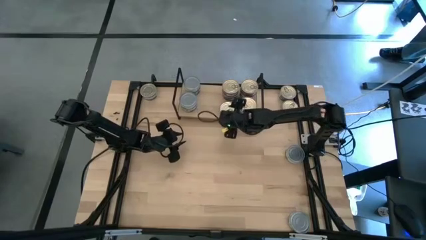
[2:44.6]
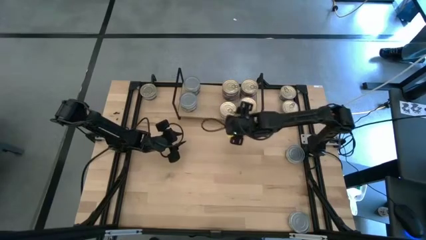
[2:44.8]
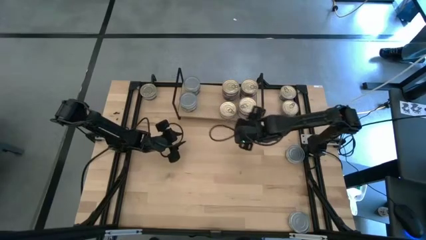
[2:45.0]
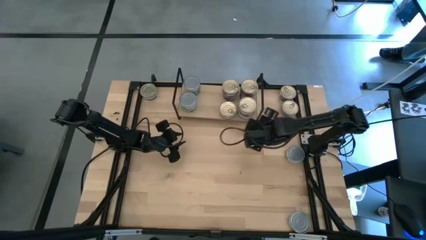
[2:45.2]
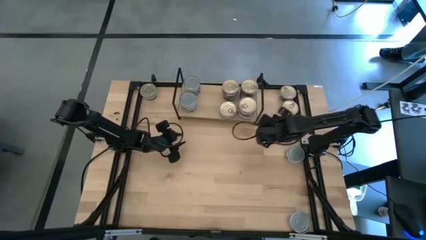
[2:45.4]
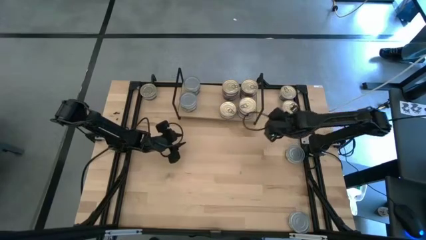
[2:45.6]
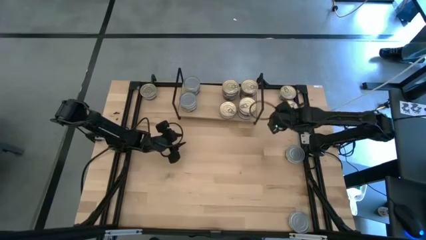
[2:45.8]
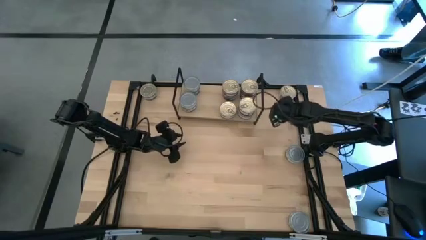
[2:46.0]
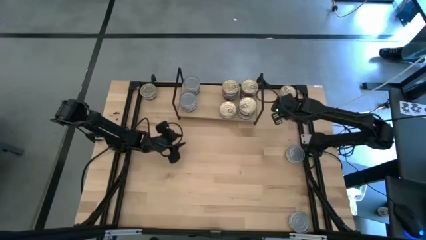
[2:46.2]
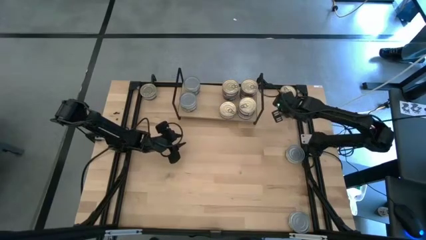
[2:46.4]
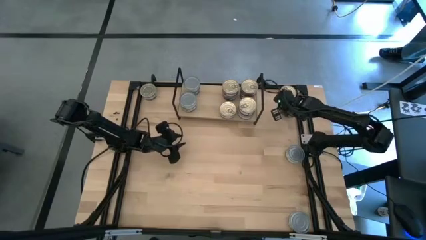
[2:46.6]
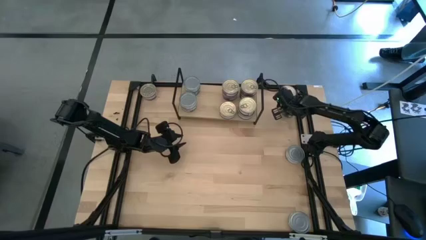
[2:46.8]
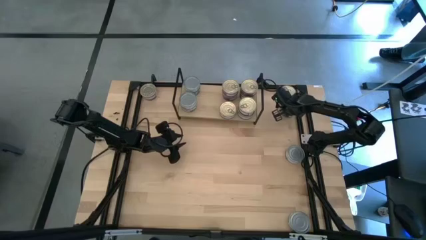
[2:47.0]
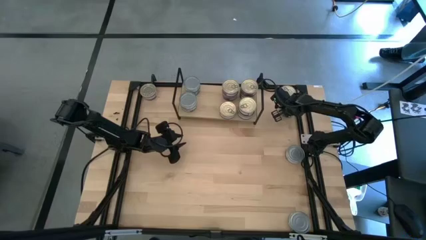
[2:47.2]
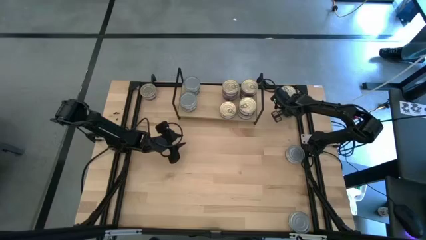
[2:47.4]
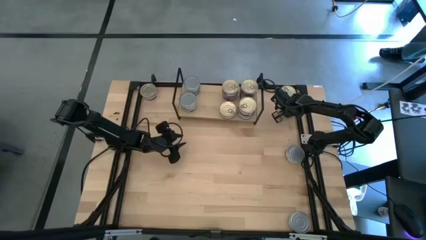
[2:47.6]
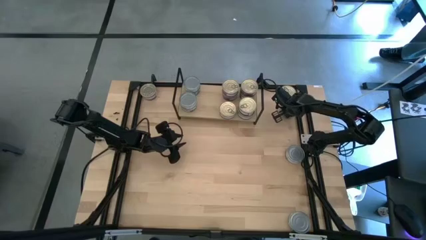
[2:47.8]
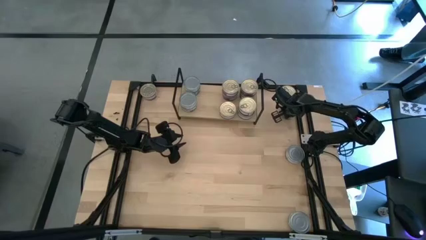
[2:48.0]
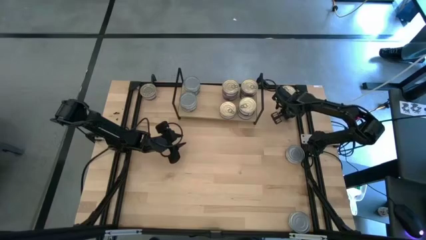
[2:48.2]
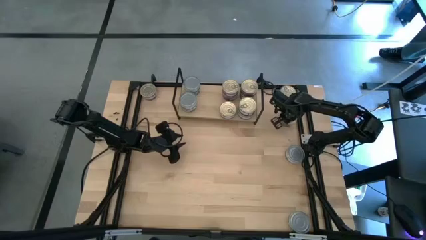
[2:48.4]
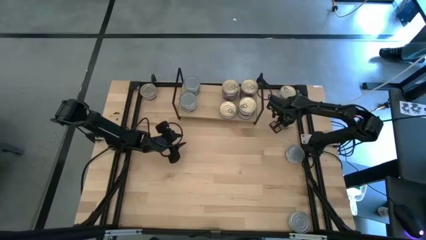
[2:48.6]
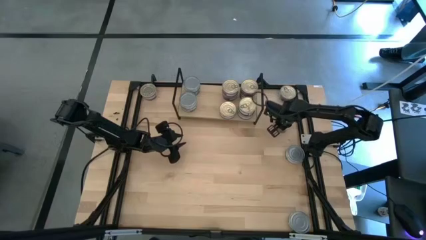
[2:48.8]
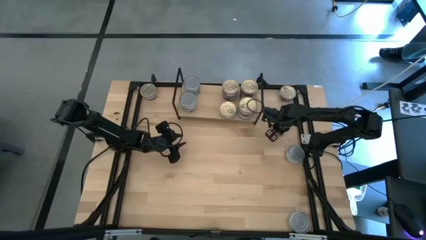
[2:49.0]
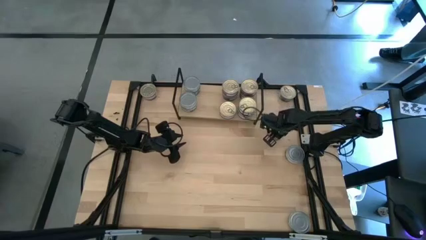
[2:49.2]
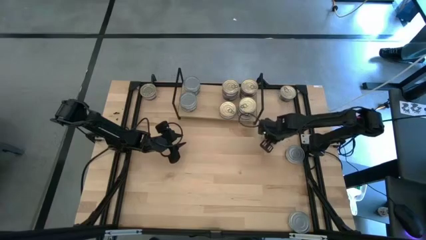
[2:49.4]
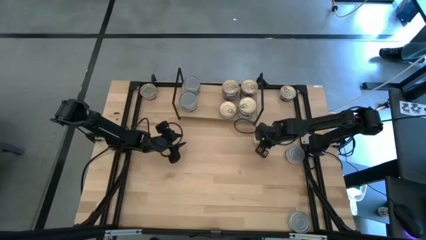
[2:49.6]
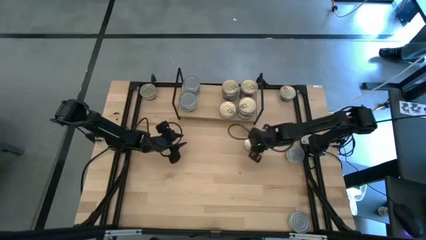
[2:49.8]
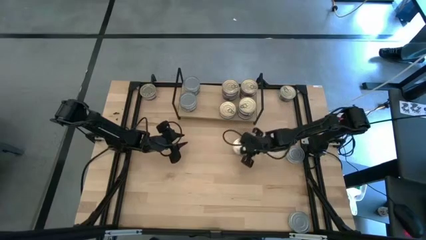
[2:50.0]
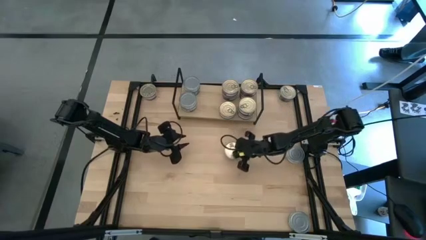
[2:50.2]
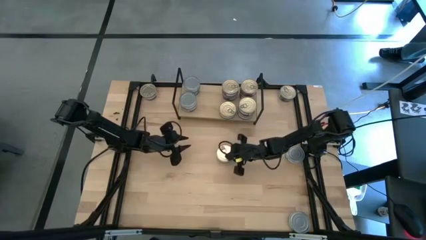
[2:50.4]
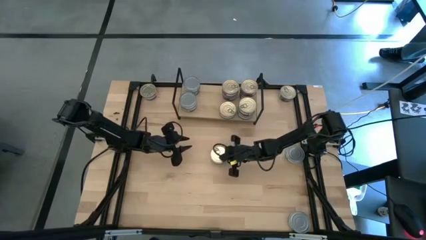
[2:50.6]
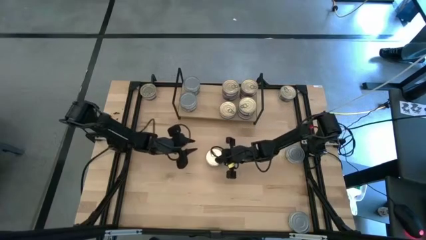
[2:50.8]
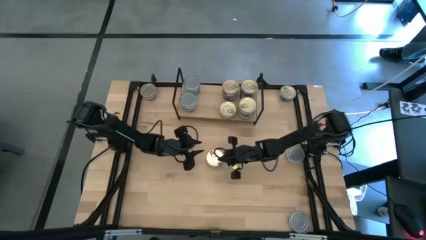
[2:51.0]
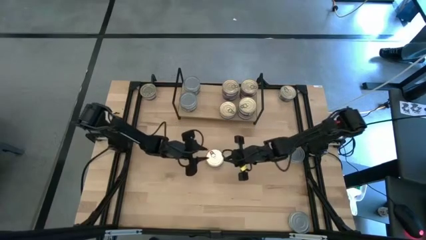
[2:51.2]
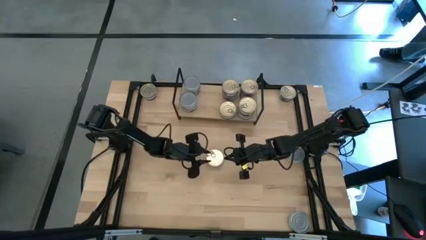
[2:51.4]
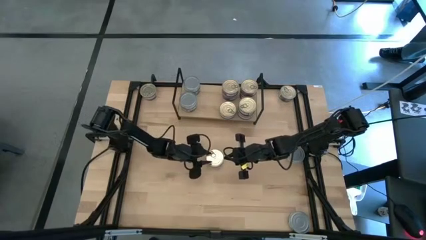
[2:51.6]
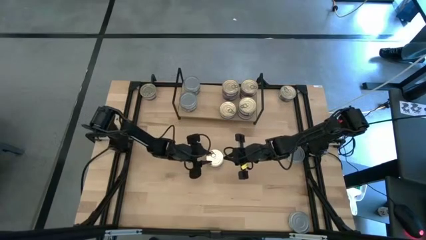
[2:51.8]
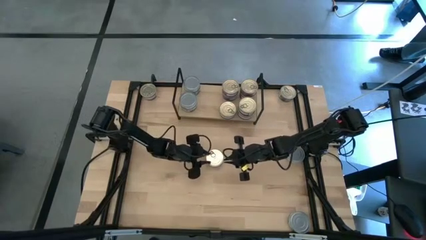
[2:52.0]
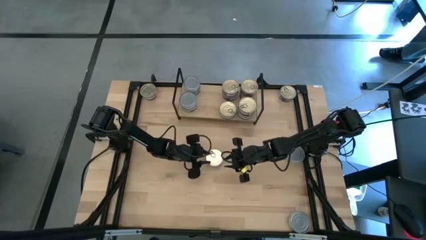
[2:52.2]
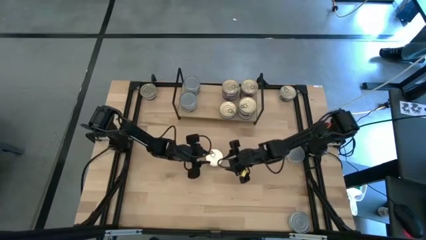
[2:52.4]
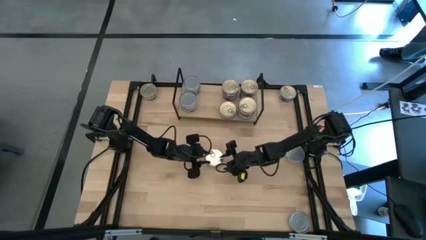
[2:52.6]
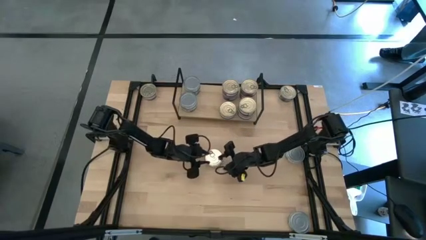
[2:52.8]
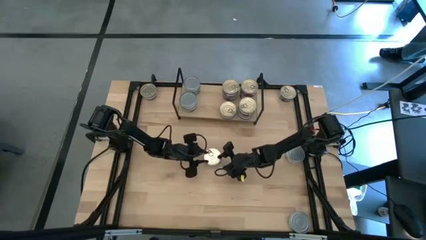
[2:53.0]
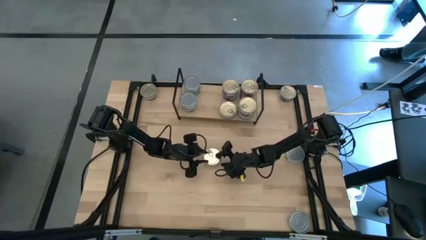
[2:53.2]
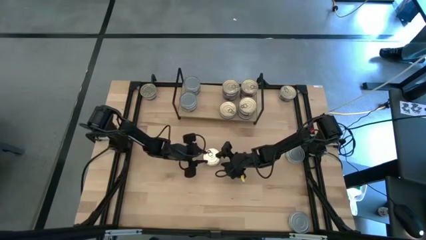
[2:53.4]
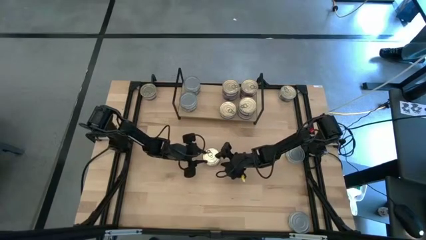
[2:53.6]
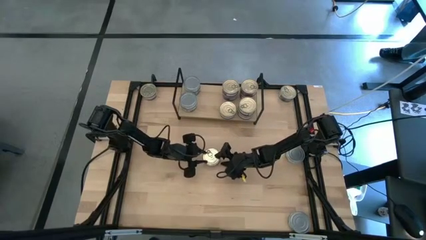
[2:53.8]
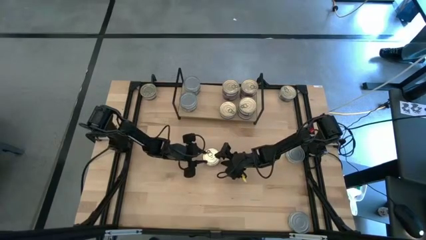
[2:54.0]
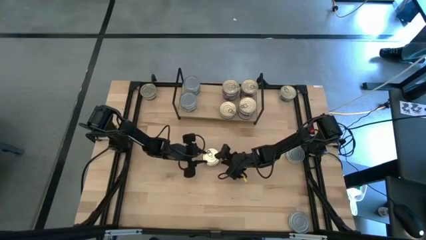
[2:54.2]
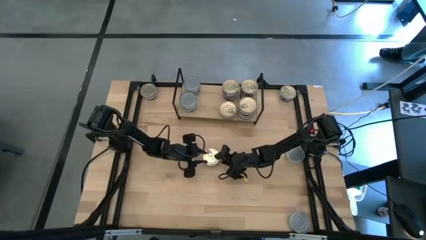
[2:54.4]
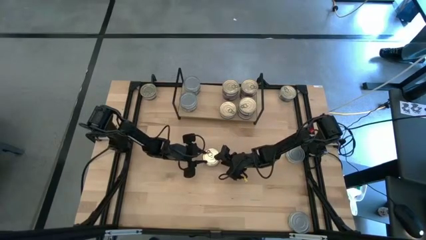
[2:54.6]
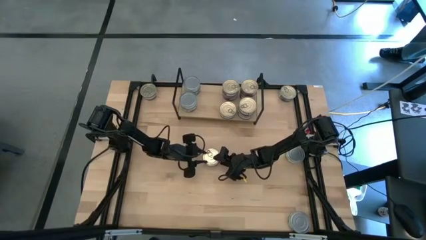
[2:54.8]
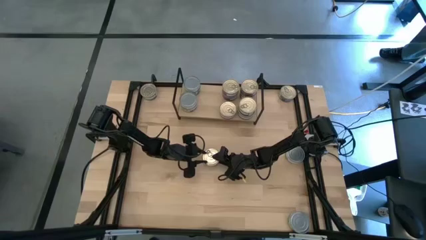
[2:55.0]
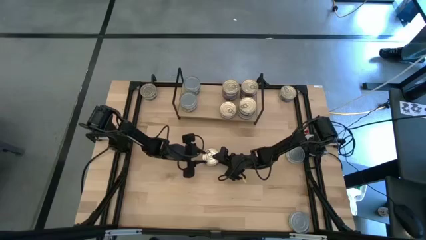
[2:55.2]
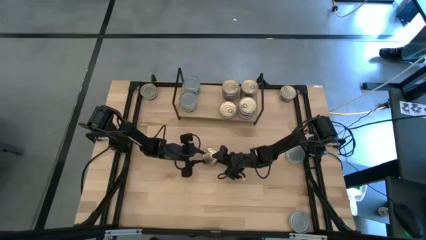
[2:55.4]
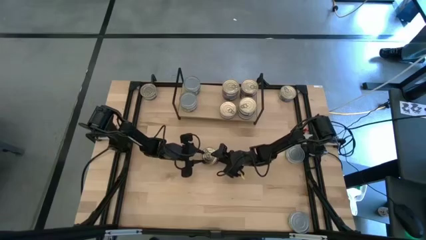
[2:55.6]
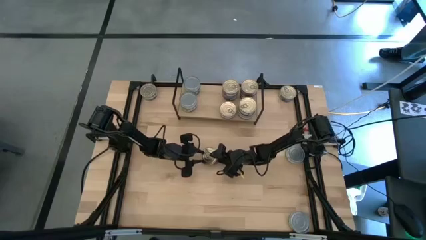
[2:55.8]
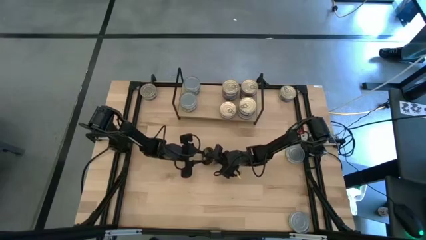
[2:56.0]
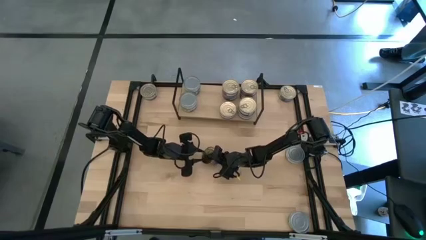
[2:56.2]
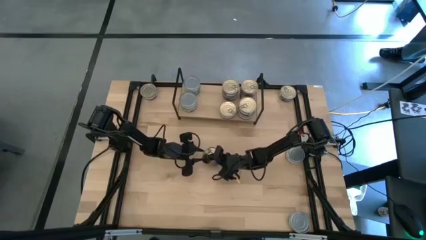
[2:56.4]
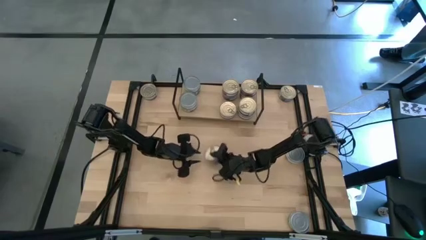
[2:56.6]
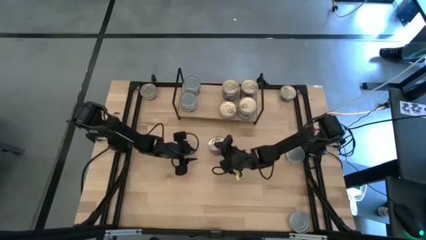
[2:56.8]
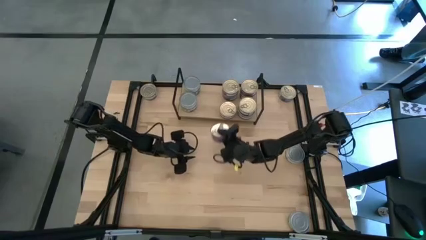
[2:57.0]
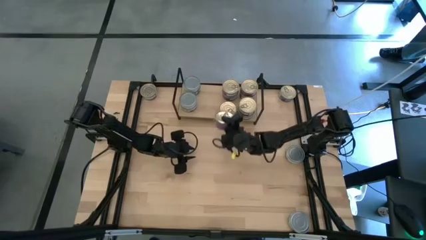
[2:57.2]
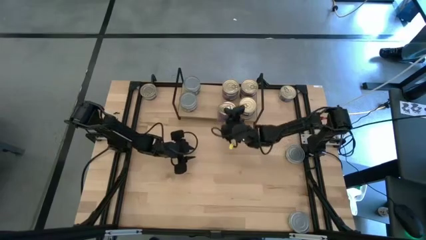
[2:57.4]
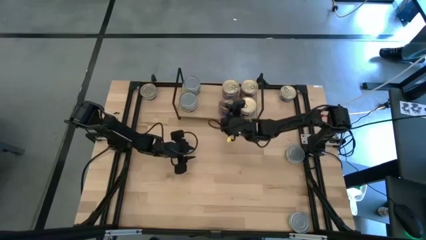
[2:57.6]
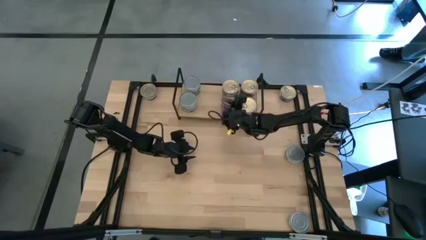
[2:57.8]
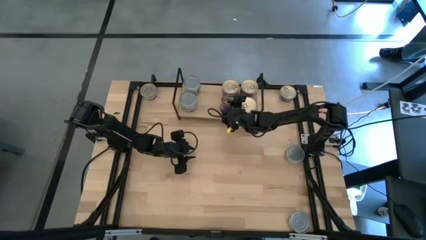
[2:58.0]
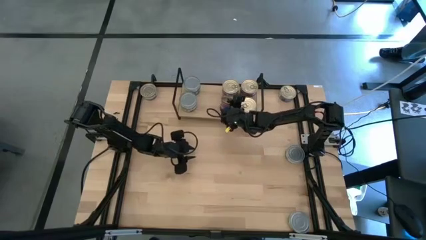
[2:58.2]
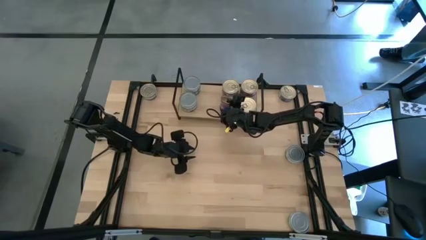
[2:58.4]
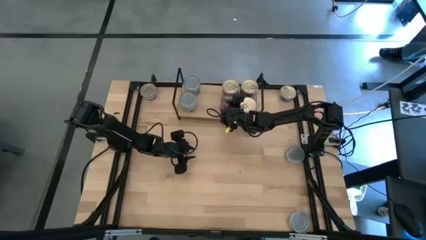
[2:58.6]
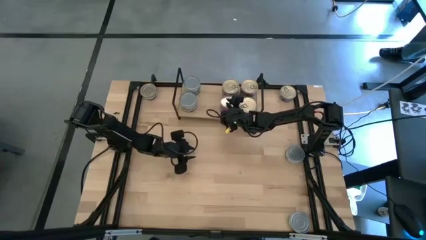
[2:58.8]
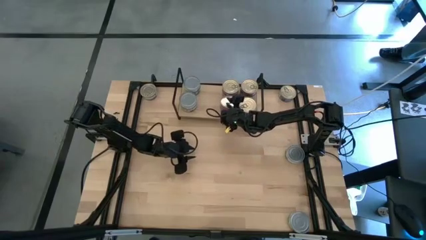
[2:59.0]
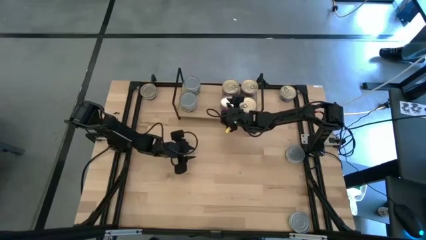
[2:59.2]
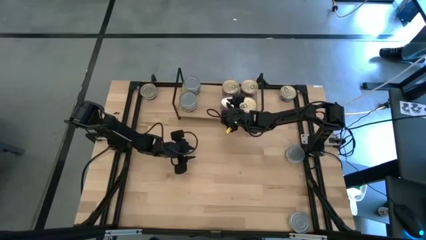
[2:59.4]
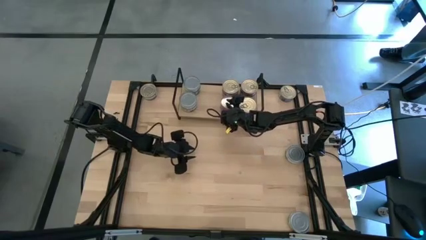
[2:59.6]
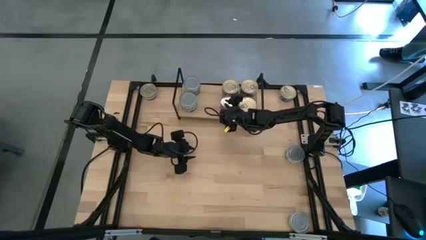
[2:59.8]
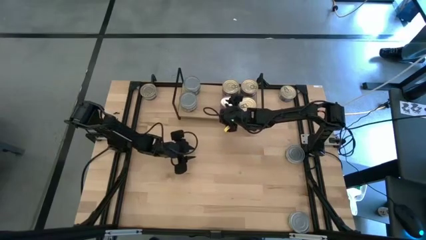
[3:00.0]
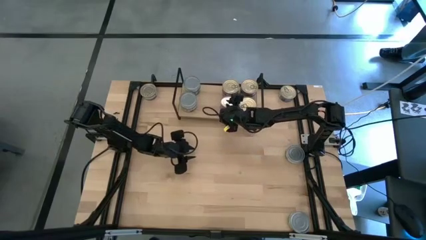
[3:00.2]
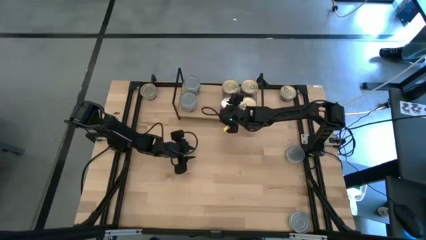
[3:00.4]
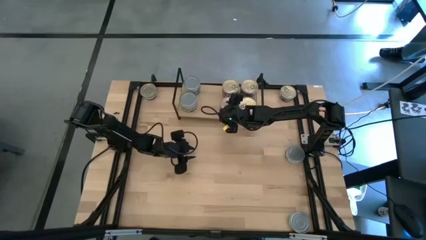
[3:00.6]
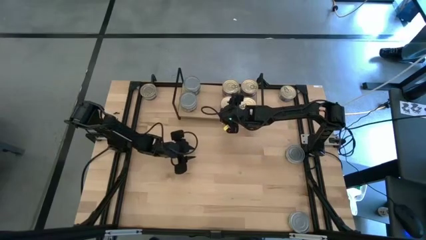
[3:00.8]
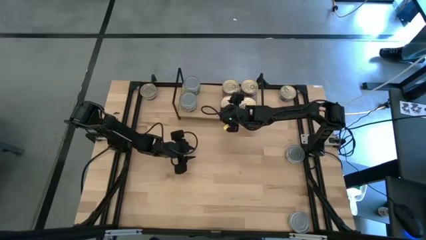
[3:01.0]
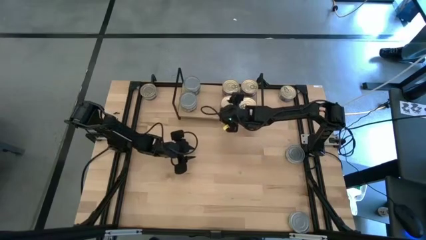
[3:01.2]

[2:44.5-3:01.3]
Task: Stack canned seafood by type on shelf
Stack the blue pink tuna can on top of the other blue pink tuna can on the shelf
